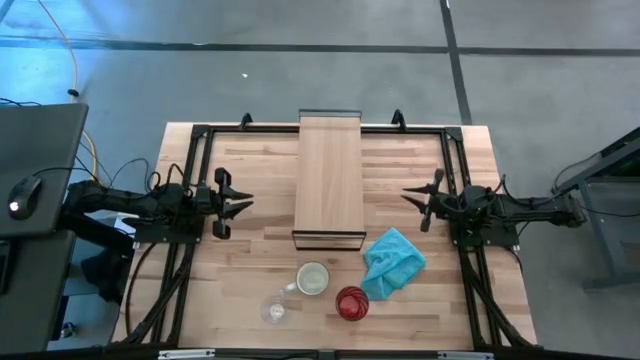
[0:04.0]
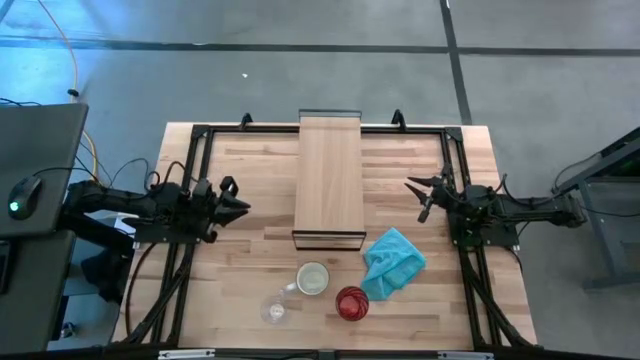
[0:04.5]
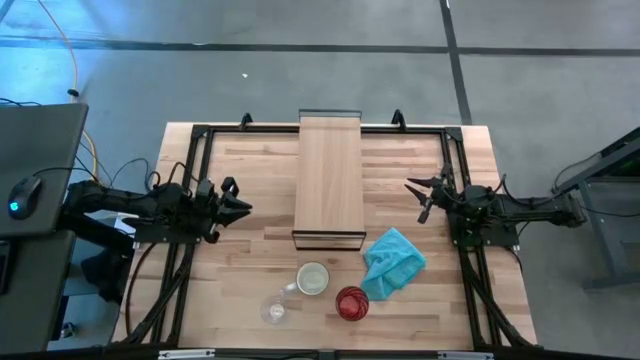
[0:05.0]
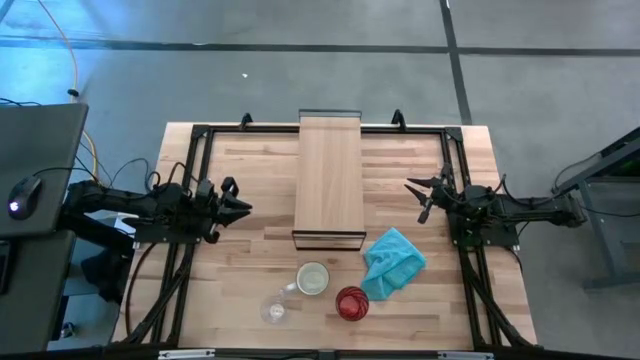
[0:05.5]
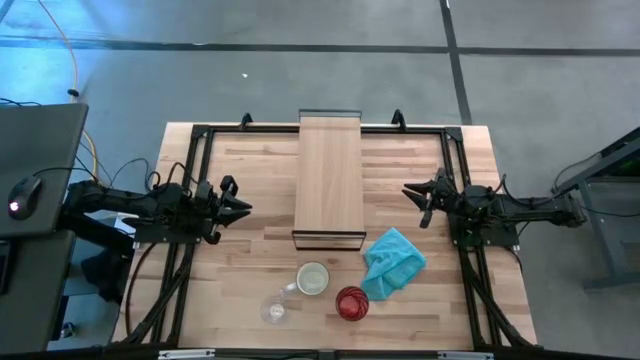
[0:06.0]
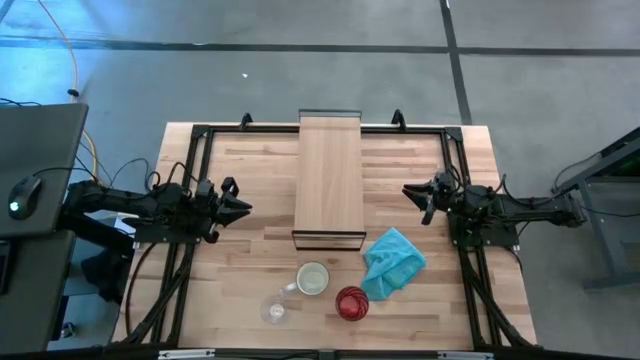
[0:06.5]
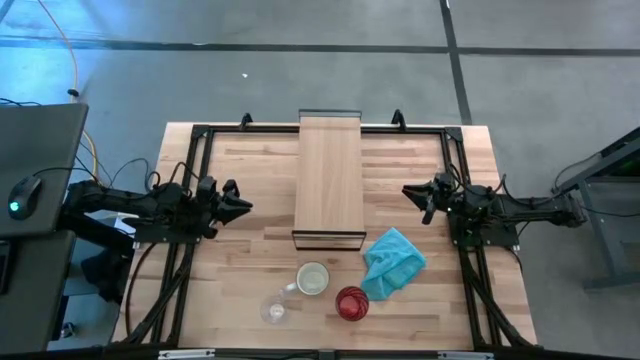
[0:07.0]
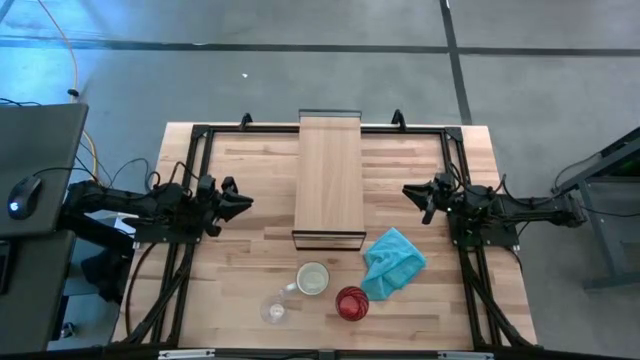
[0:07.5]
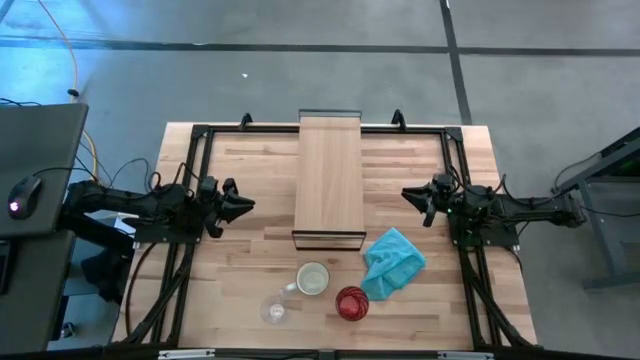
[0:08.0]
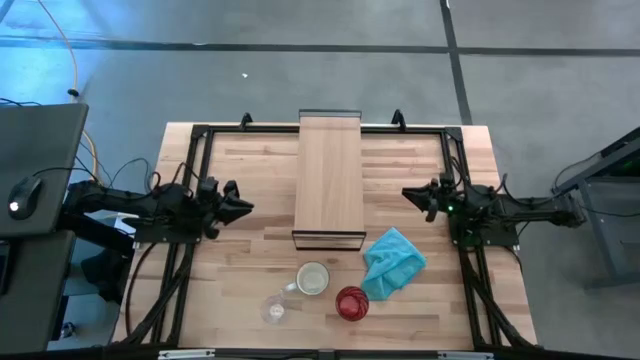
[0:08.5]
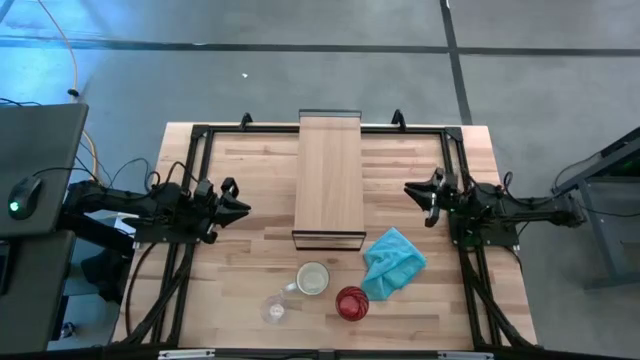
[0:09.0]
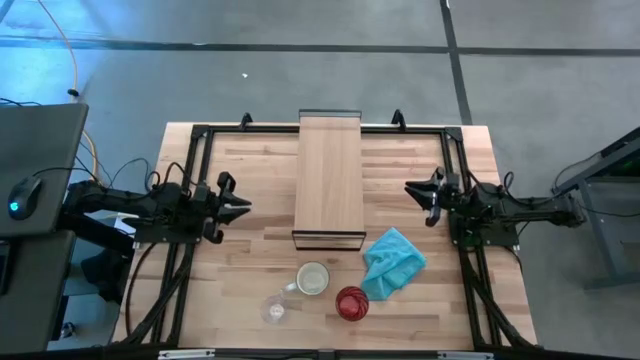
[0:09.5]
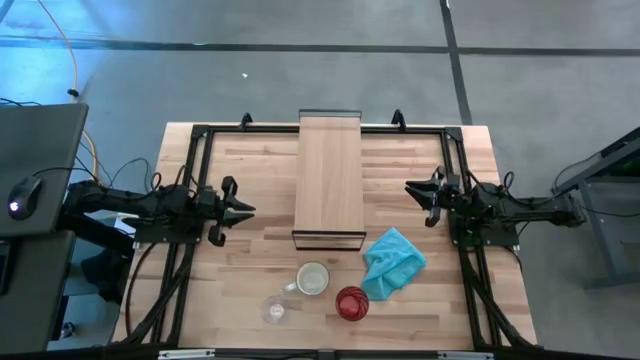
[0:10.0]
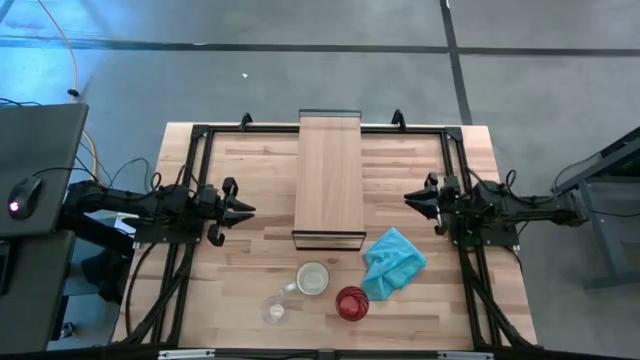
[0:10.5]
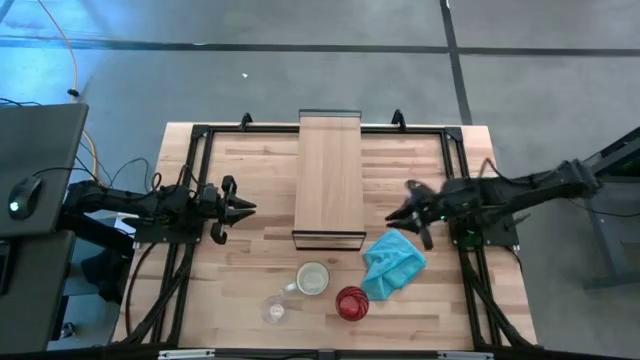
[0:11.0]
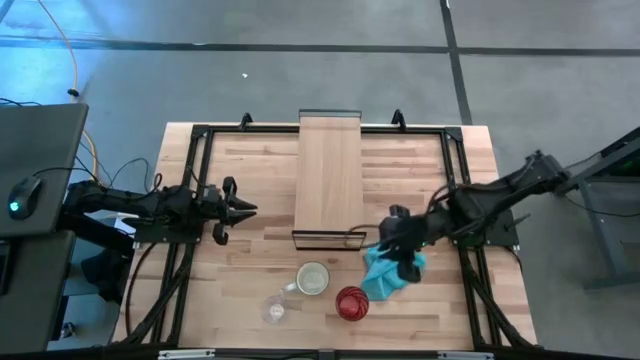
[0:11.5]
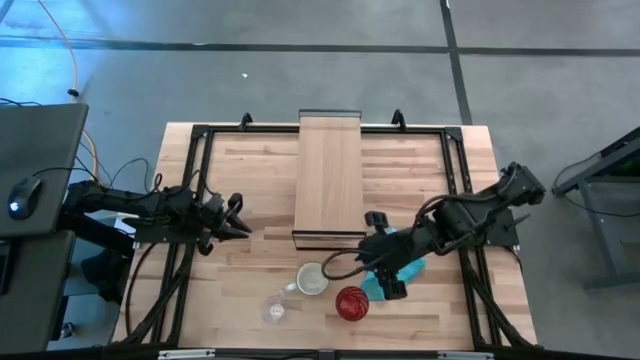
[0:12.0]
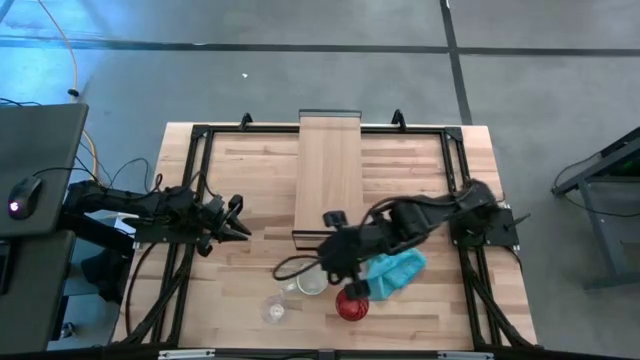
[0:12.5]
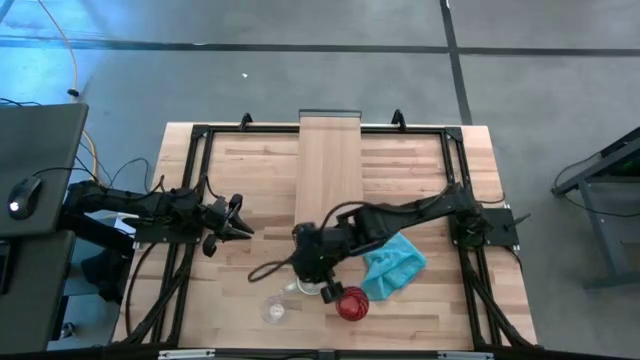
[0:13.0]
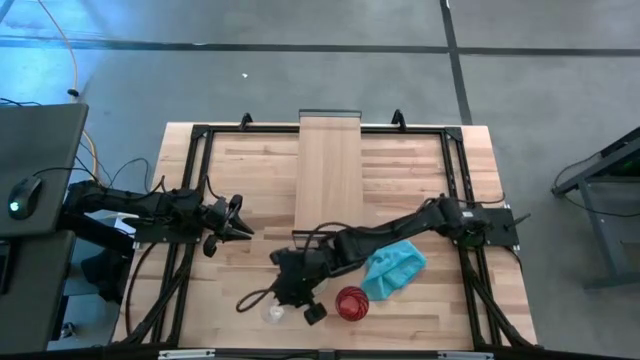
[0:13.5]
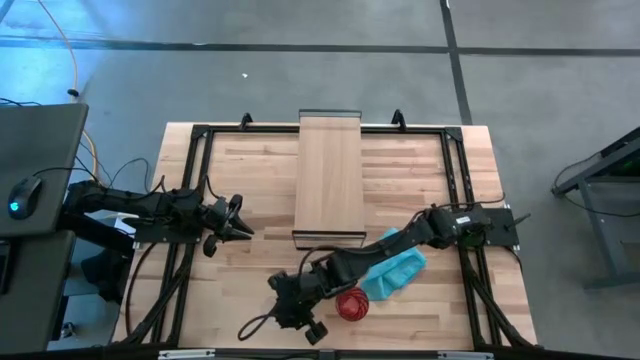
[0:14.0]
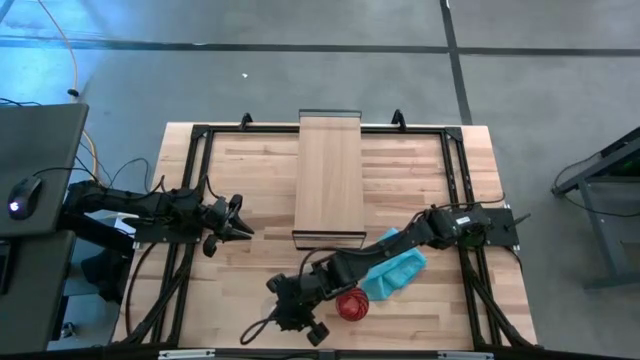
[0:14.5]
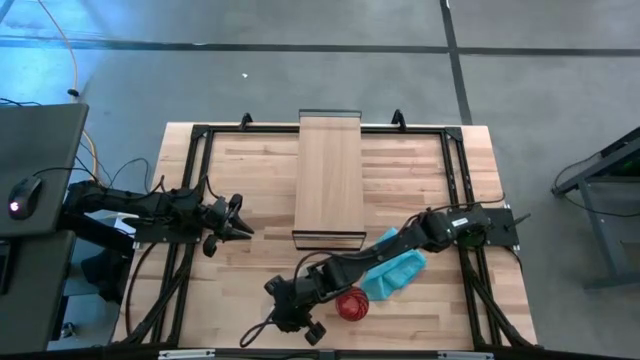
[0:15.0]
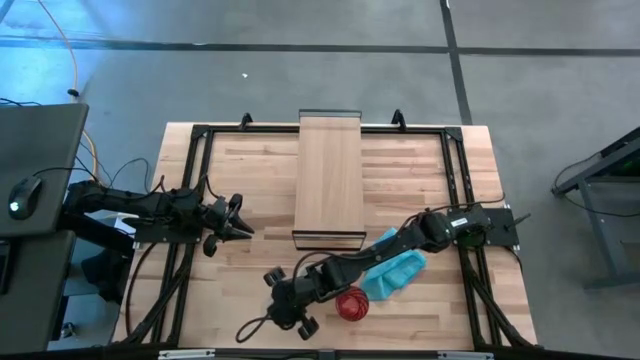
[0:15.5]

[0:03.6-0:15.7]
Task: Stack small to large cups/mugs on shelf
Put the transparent cup on the shelf

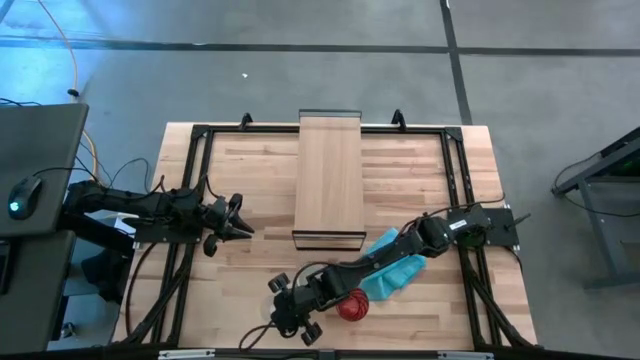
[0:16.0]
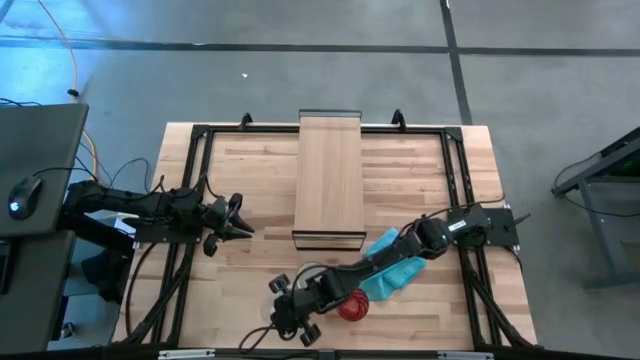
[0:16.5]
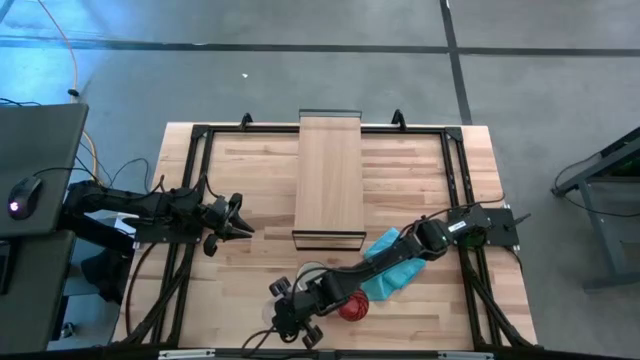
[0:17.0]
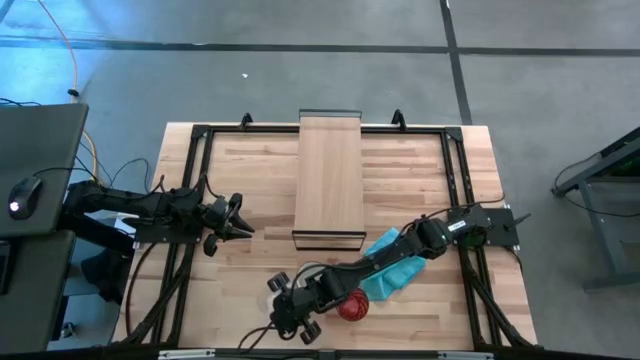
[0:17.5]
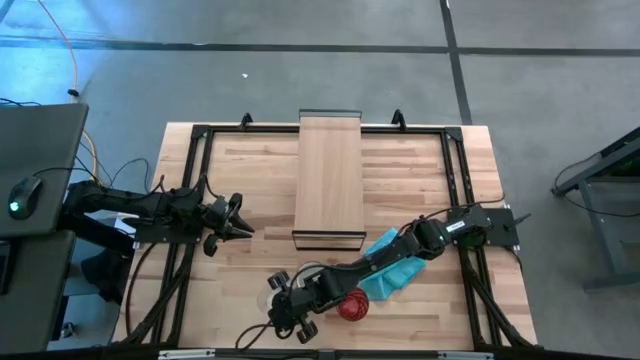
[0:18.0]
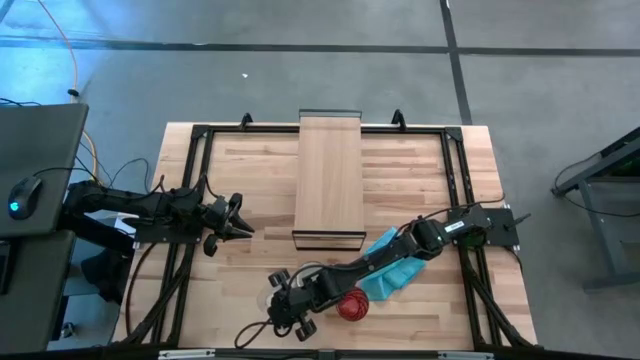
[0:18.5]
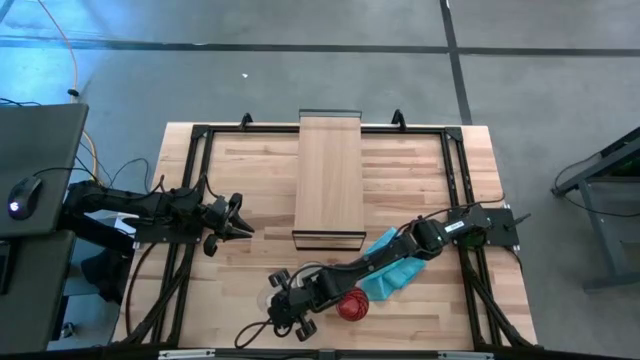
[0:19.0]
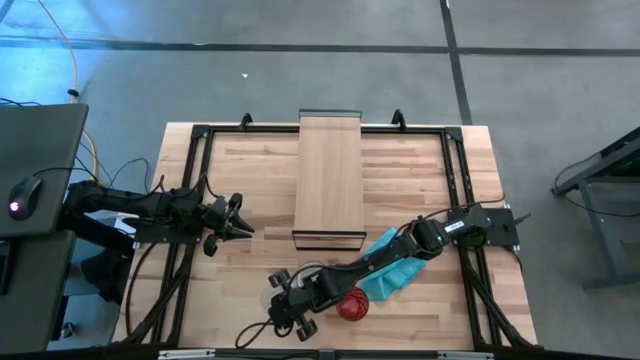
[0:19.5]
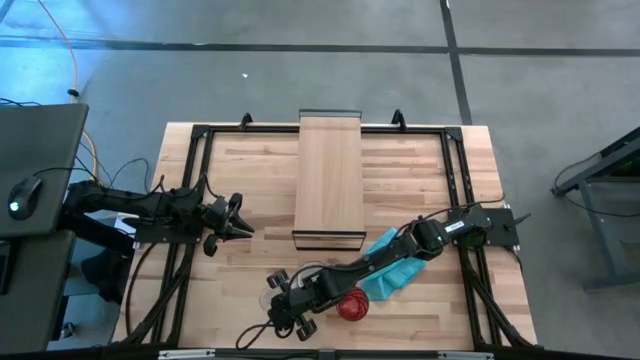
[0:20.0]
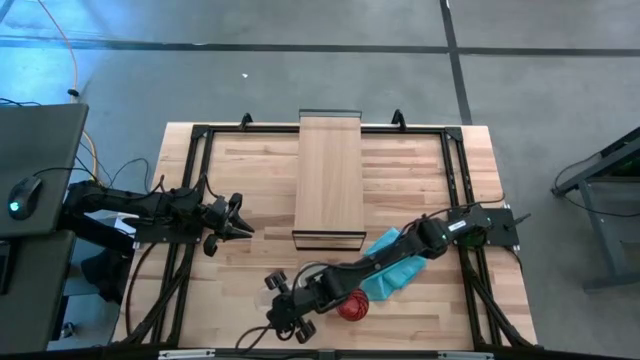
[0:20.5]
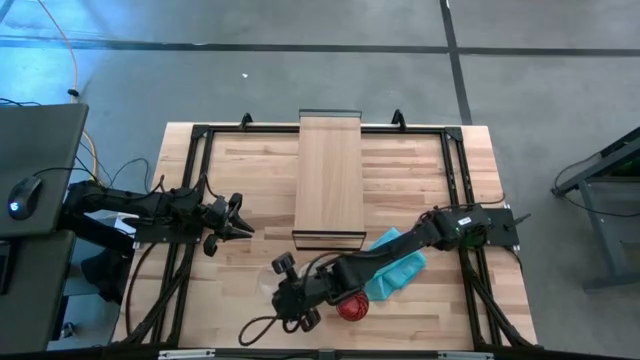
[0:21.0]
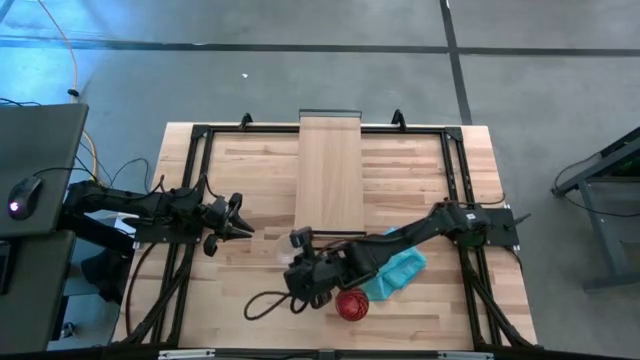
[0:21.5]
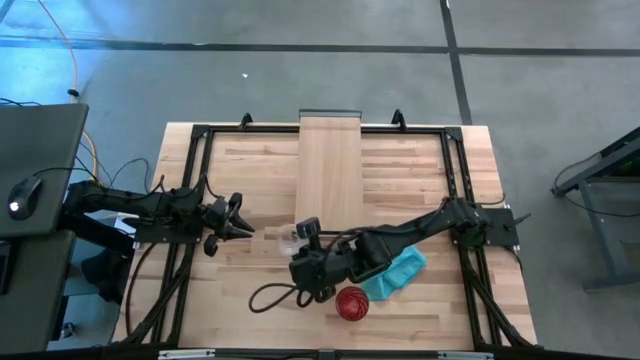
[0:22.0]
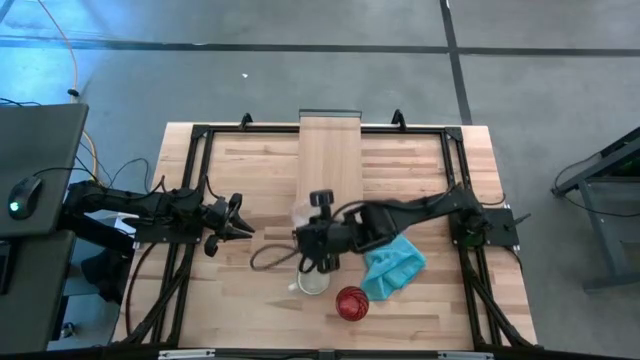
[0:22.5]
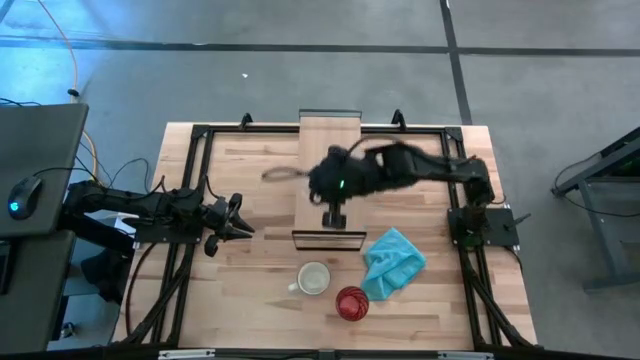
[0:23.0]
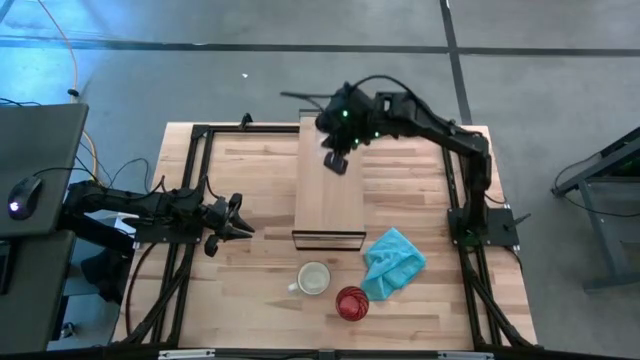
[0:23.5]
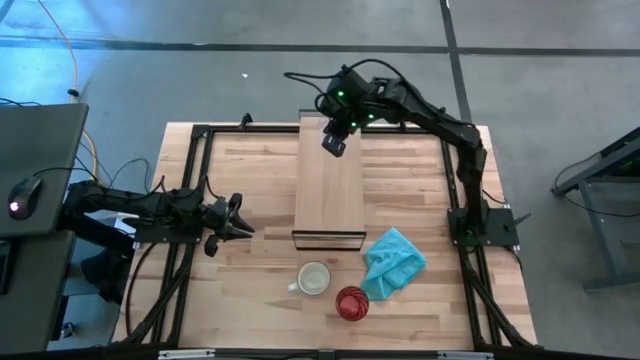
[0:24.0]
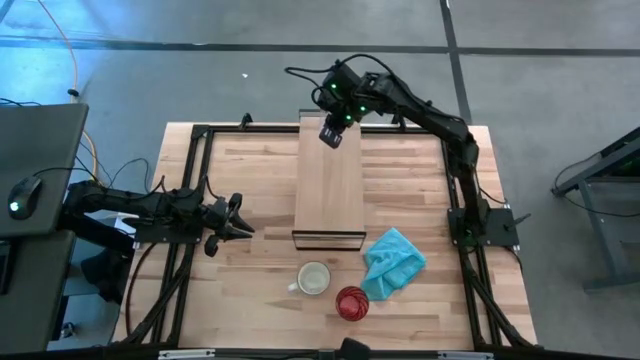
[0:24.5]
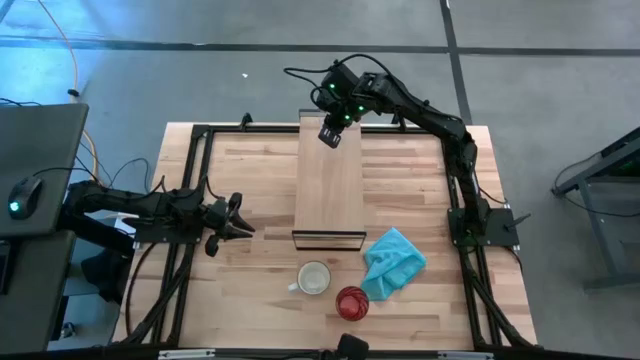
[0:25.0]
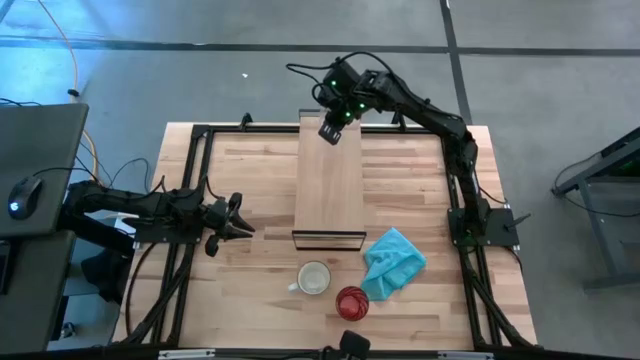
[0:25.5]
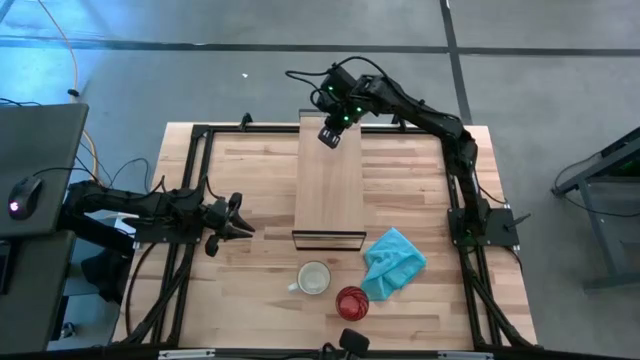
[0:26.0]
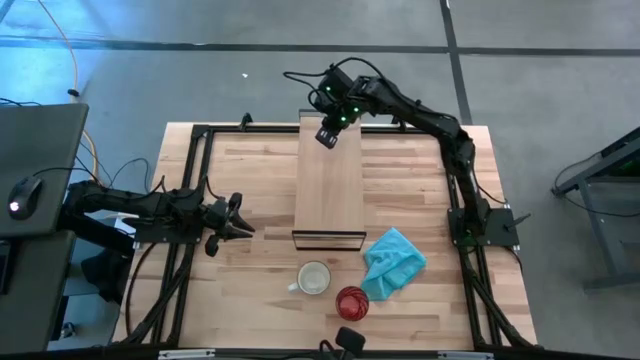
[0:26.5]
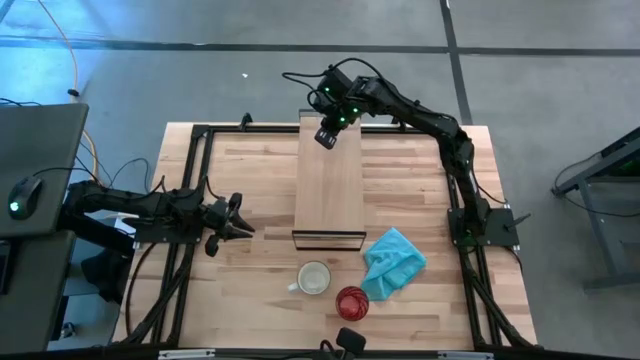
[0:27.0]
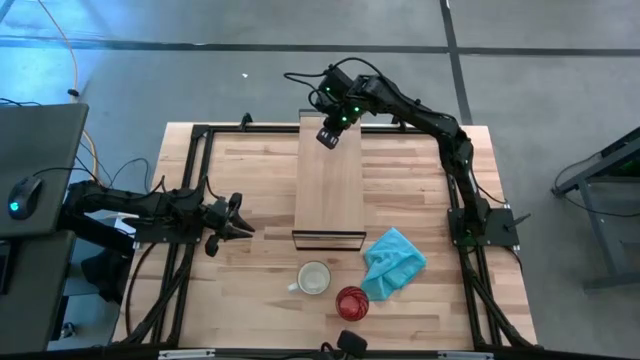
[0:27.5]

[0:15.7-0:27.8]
Put the transparent cup on the shelf
